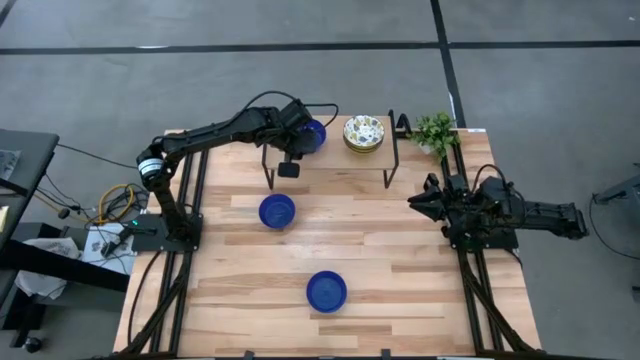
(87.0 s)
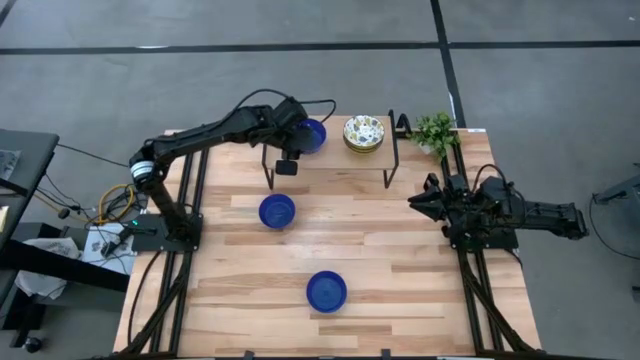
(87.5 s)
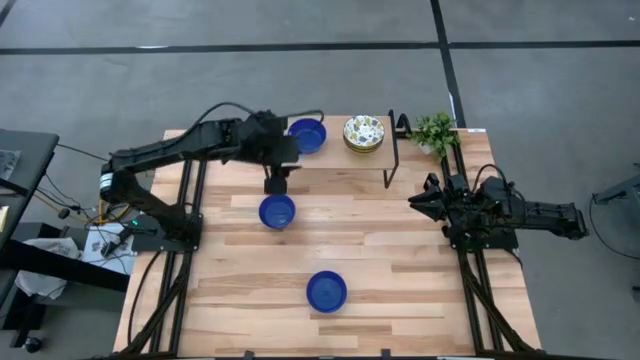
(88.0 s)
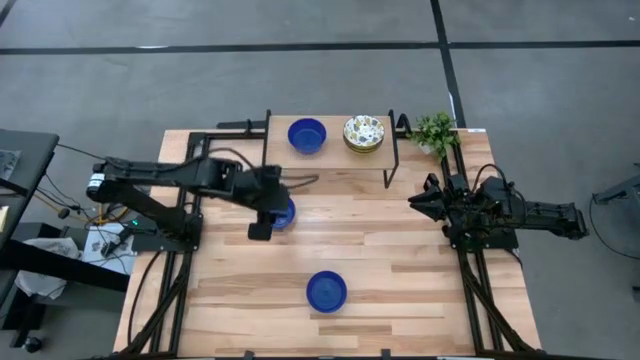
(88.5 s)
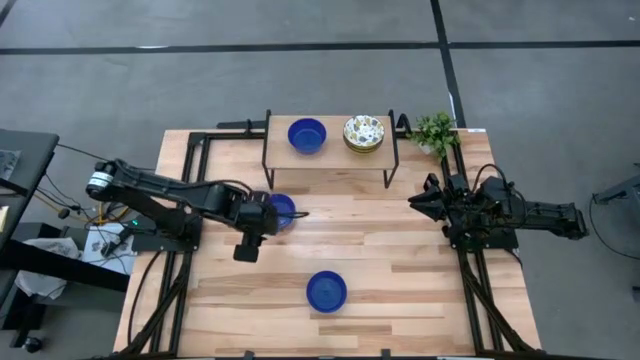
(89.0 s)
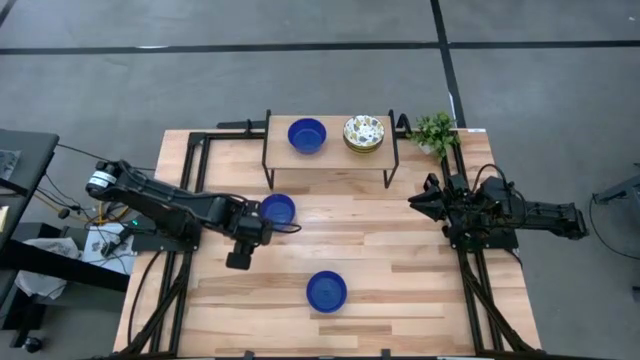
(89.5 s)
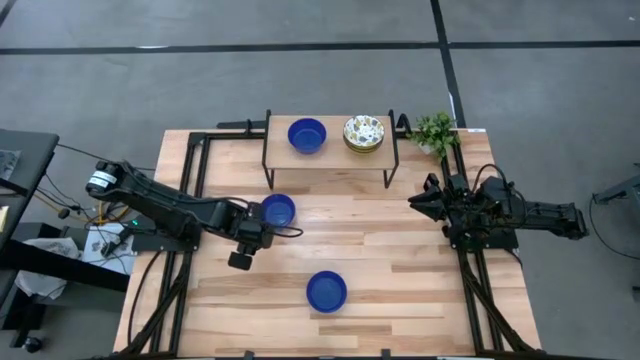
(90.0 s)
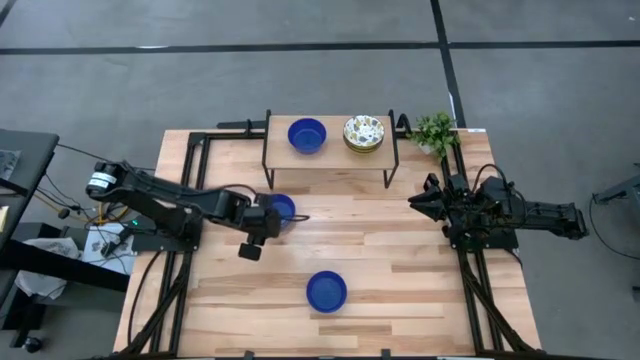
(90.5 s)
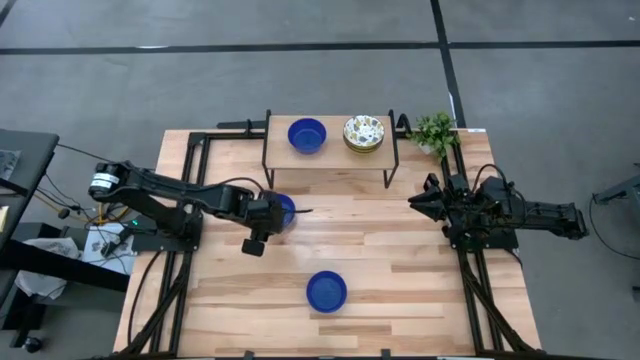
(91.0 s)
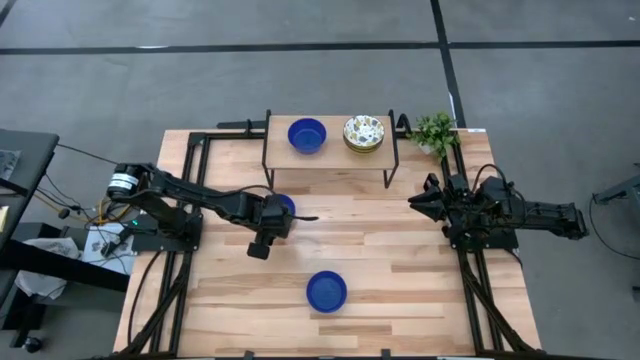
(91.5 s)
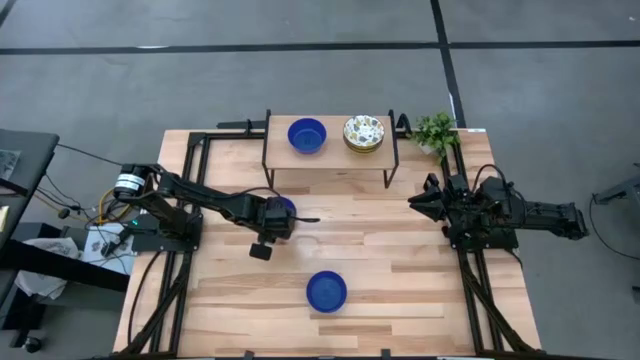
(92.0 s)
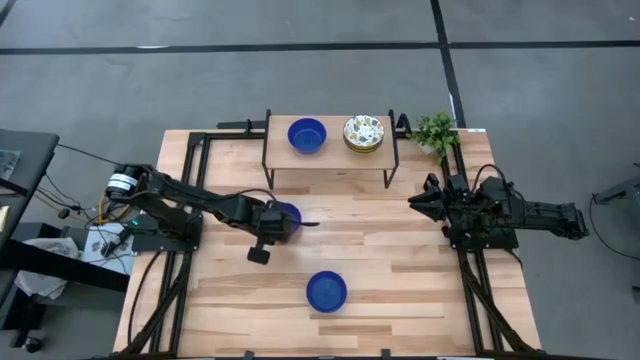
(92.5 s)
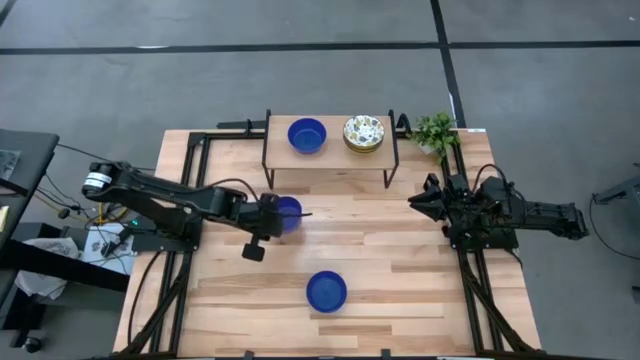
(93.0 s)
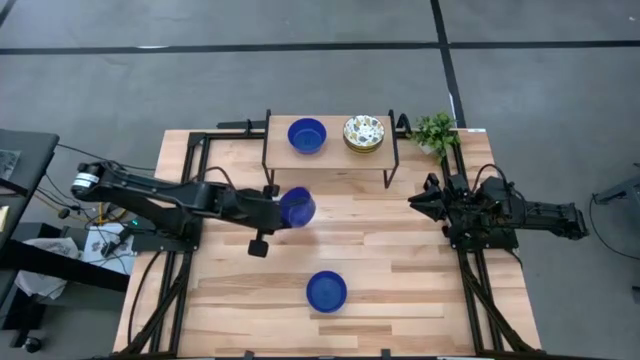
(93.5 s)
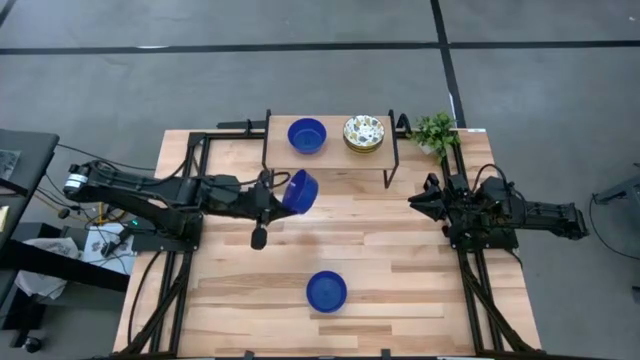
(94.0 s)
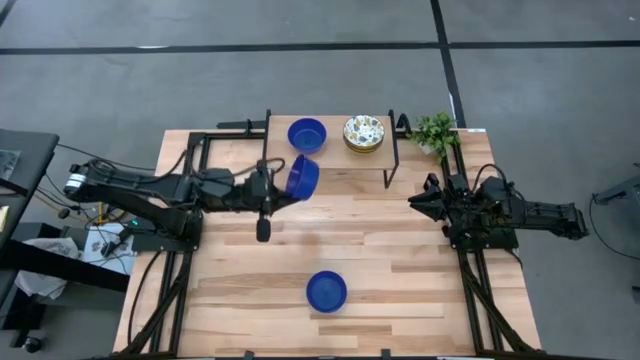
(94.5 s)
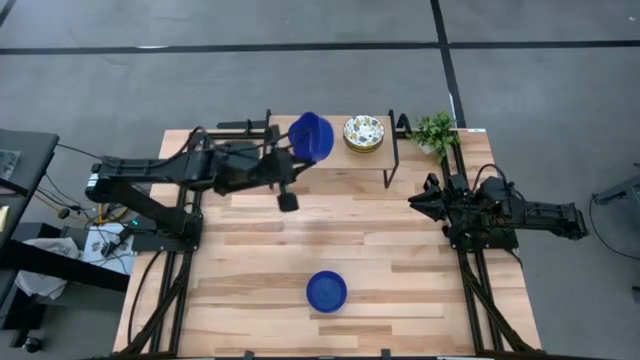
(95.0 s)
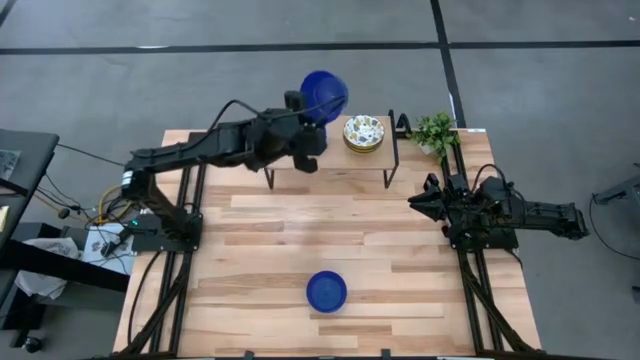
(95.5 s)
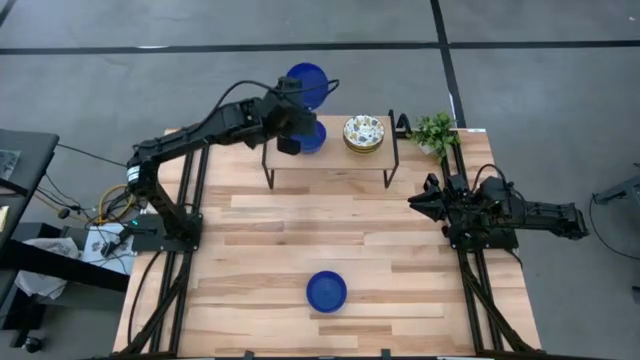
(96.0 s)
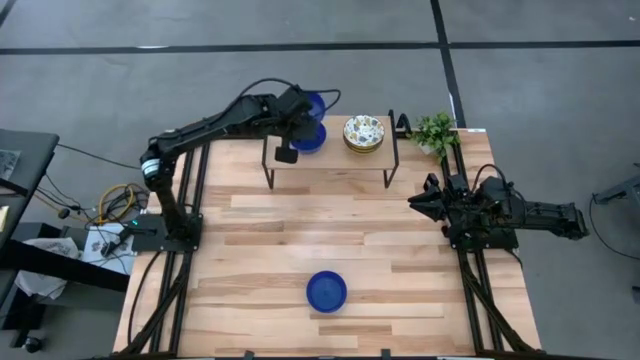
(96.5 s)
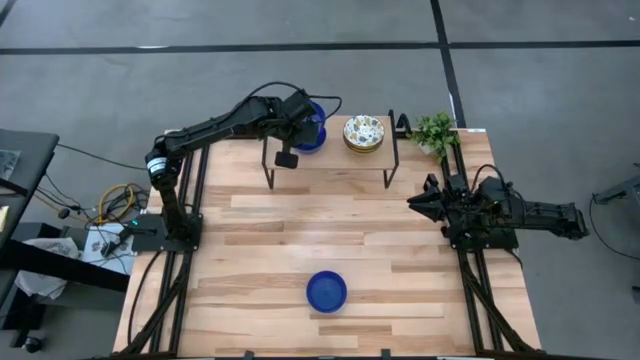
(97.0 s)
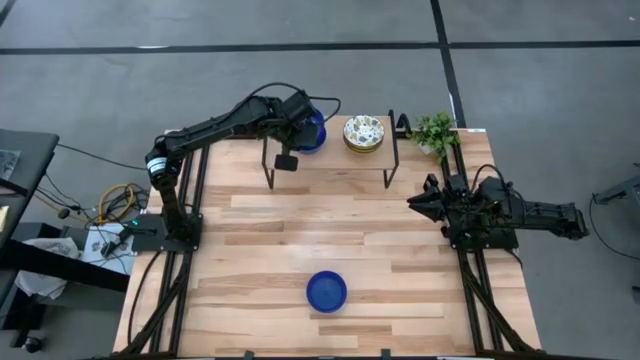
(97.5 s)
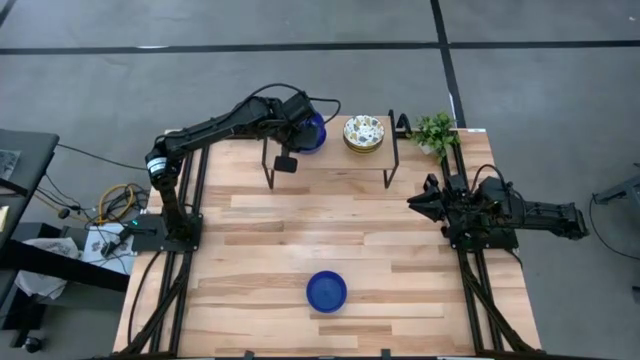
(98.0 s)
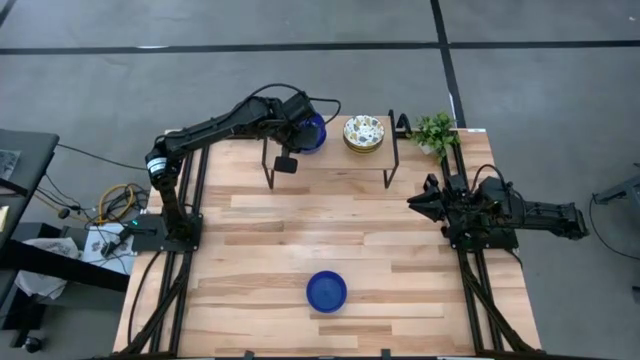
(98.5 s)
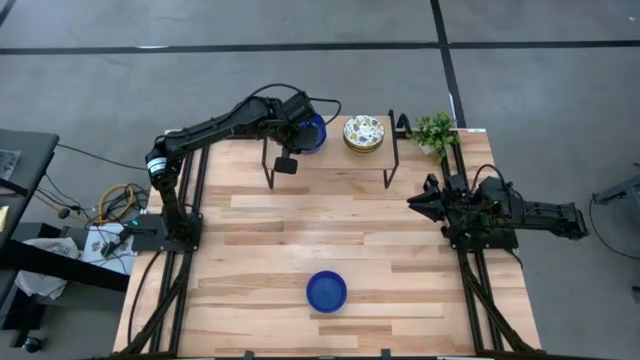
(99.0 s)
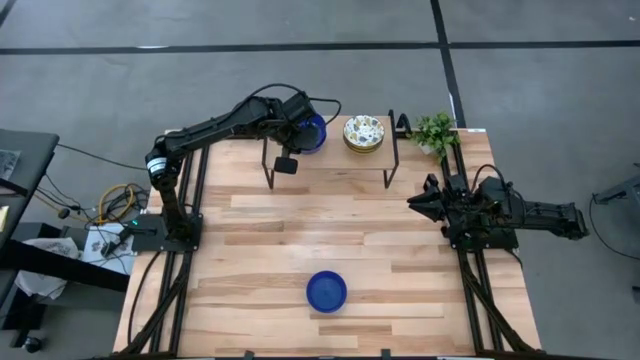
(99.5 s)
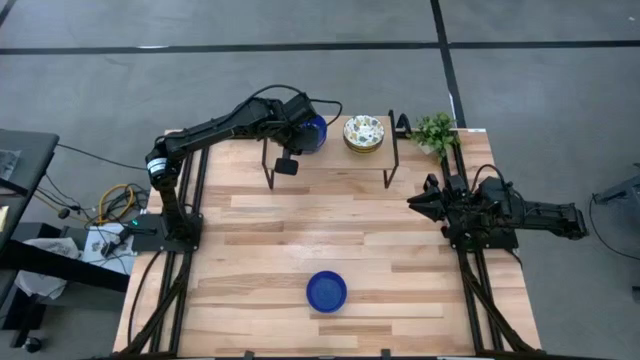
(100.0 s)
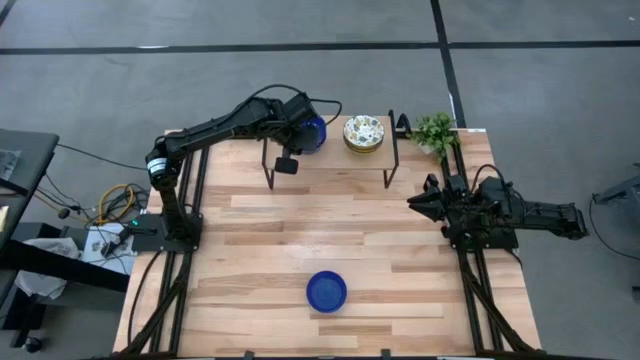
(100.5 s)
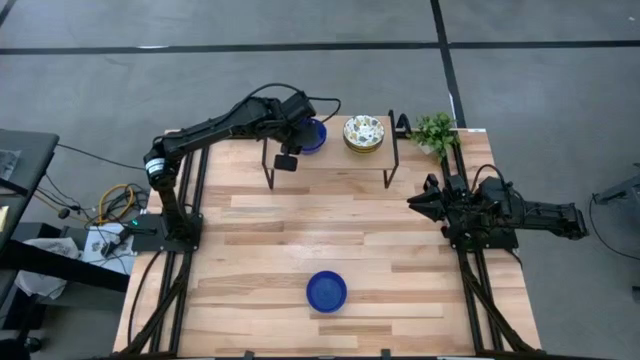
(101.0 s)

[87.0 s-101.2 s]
Task: Pick & Place Mini bowls
Stack the top blue bowl on top of the blue bowl on the shelf

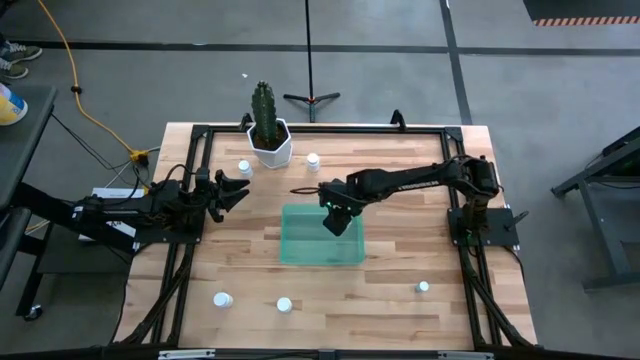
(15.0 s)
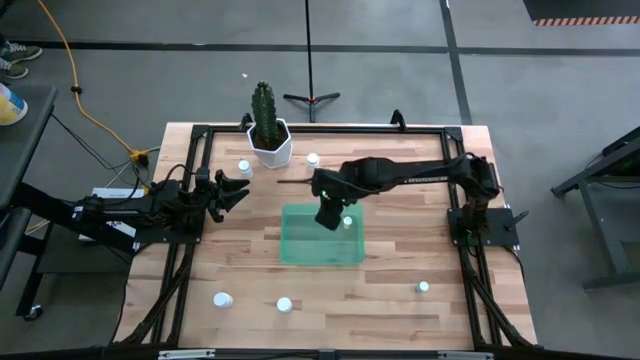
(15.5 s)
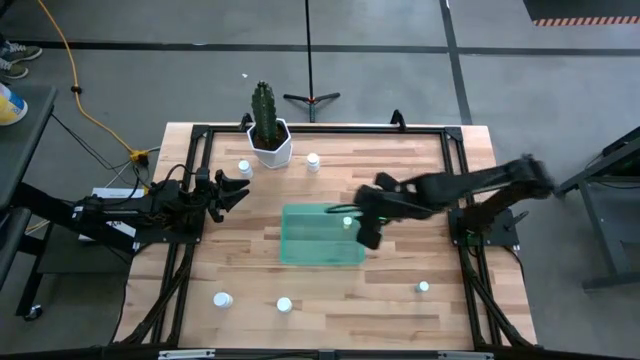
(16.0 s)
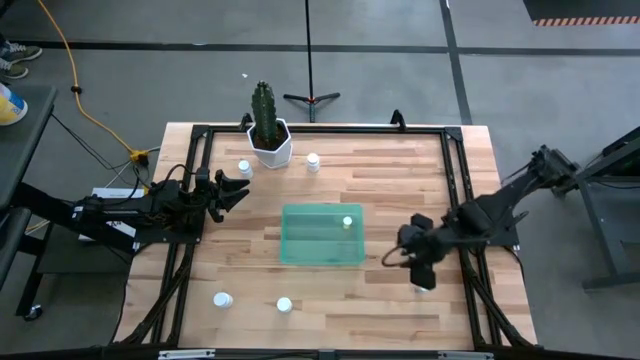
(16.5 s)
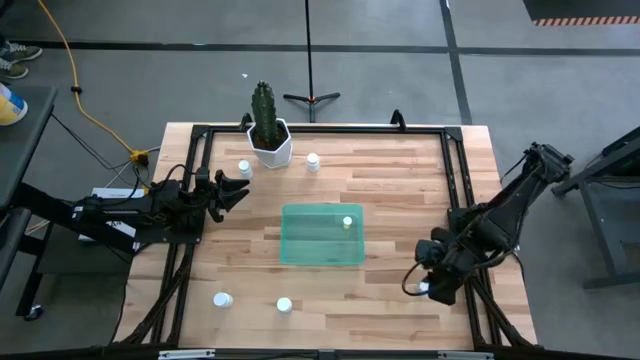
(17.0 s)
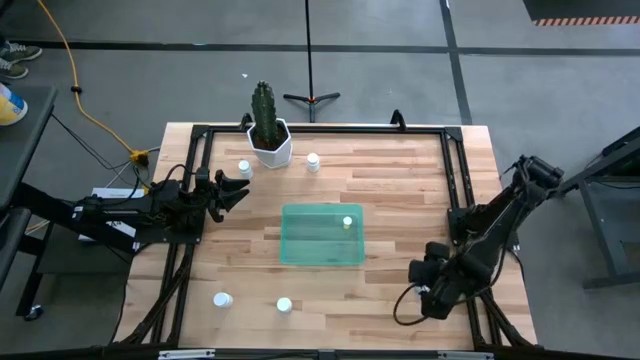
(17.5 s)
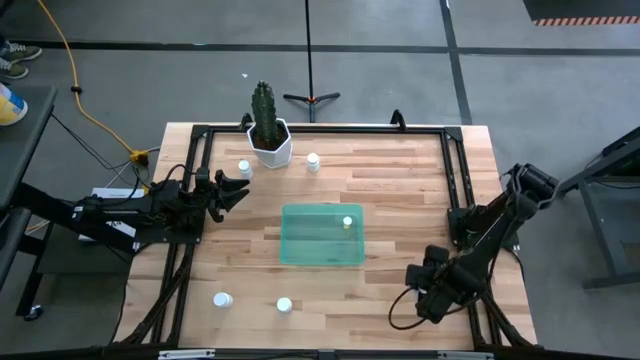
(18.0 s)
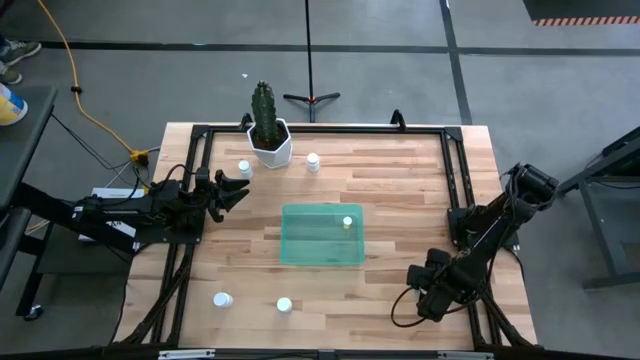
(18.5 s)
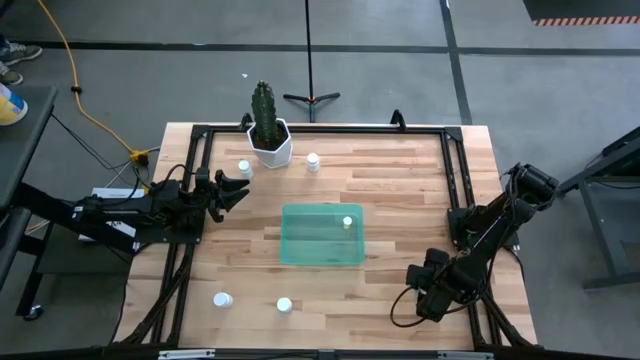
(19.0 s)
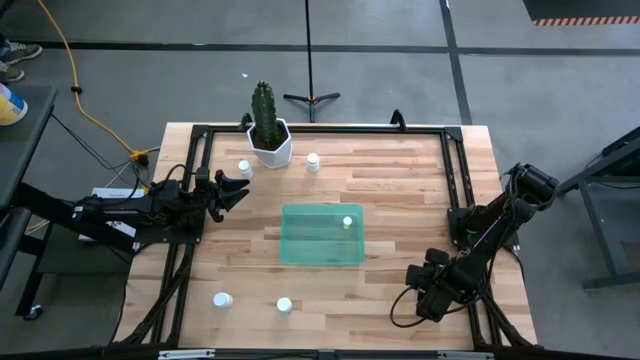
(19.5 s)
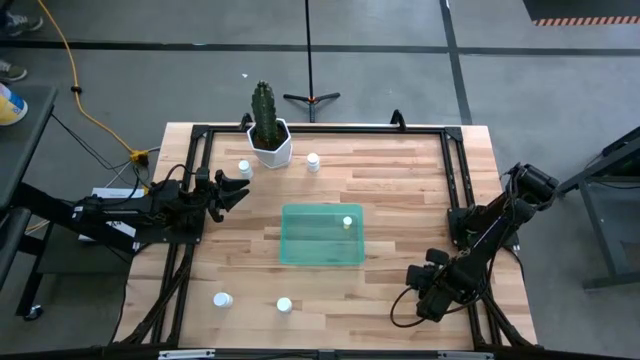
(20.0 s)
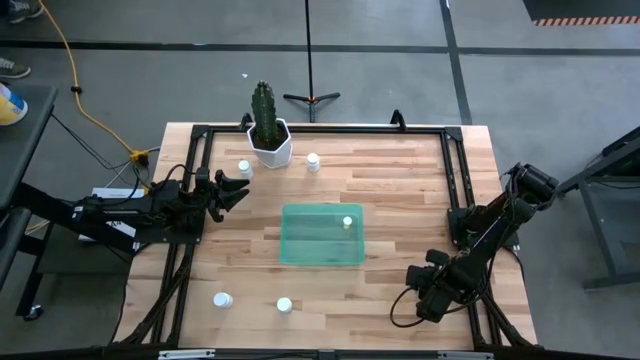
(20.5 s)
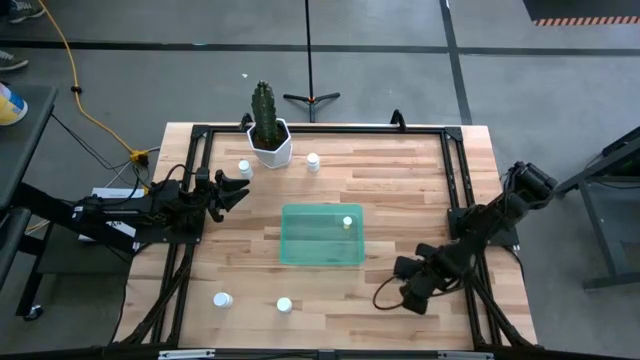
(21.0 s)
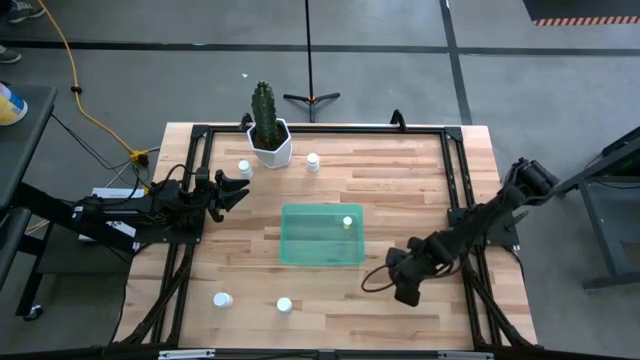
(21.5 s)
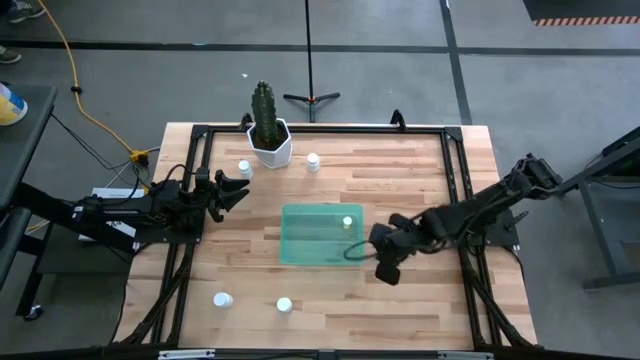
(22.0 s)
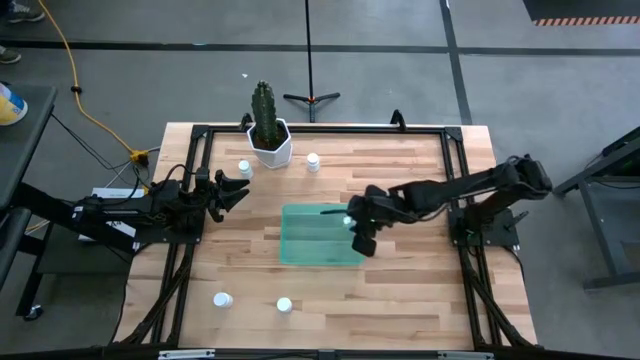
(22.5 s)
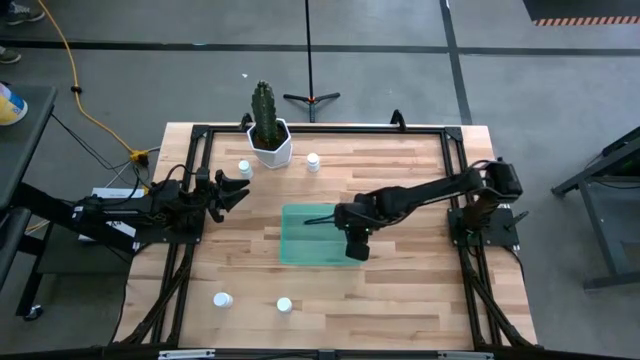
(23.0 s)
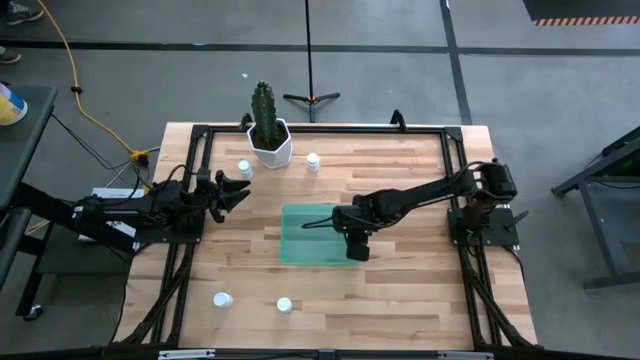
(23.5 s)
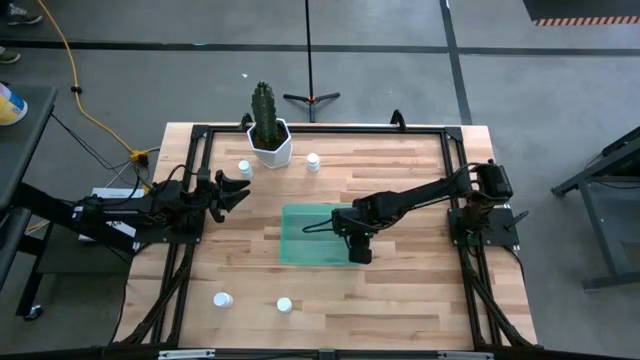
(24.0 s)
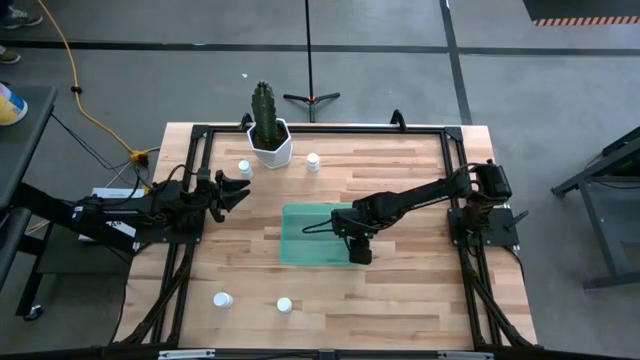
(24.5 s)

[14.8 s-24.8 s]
Task: Pick and place pill bottles into a basket
Put the blue pill bottle into the blue bin
